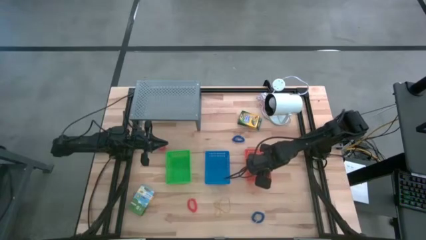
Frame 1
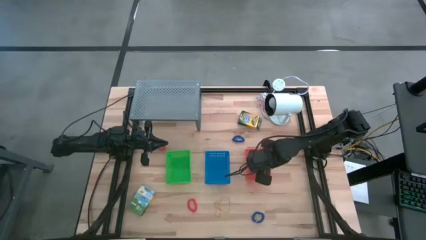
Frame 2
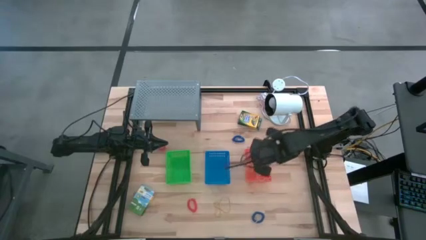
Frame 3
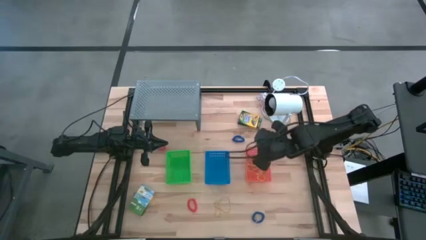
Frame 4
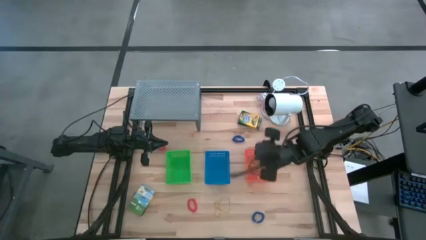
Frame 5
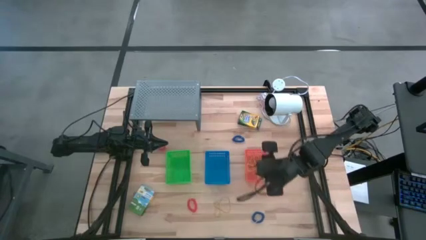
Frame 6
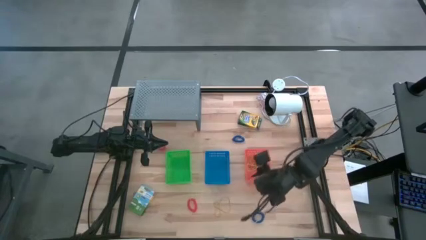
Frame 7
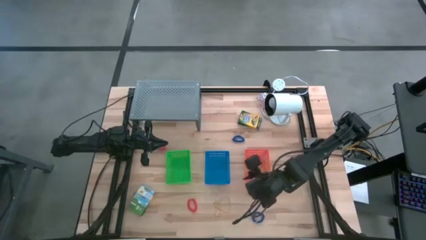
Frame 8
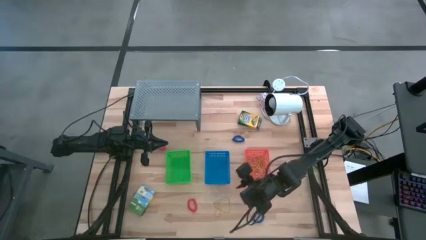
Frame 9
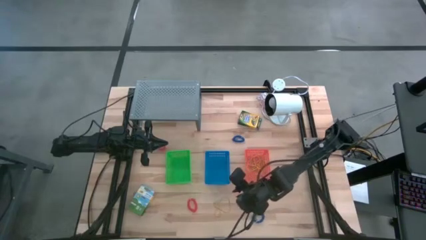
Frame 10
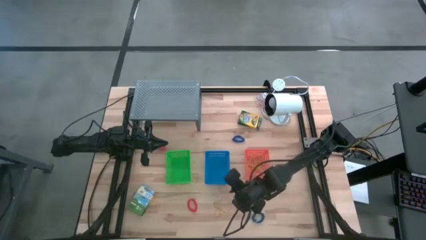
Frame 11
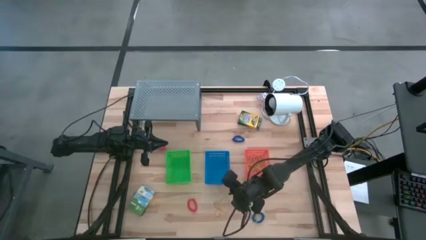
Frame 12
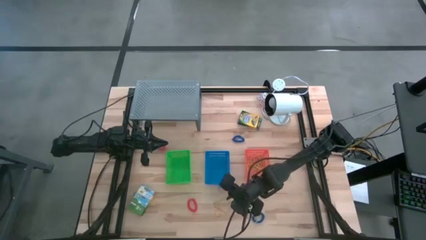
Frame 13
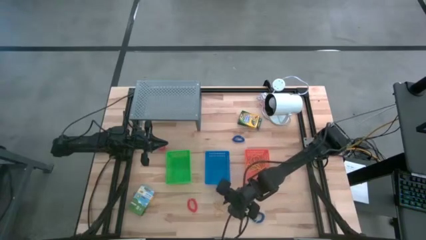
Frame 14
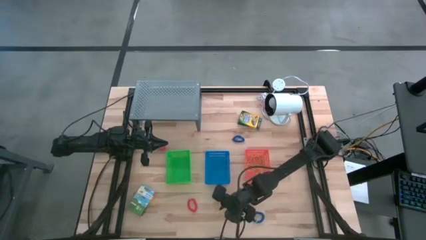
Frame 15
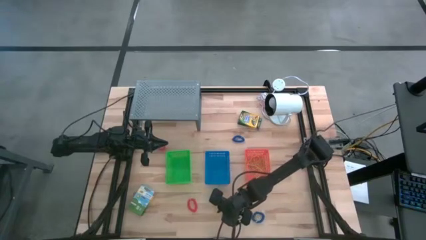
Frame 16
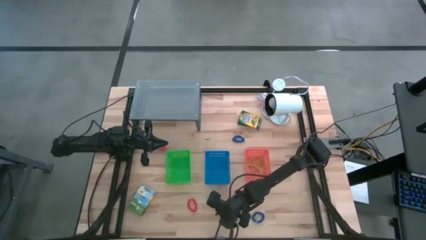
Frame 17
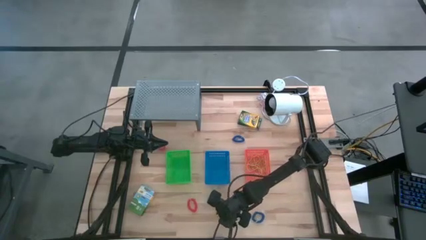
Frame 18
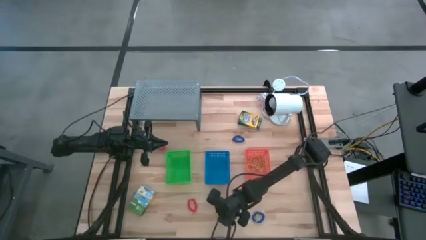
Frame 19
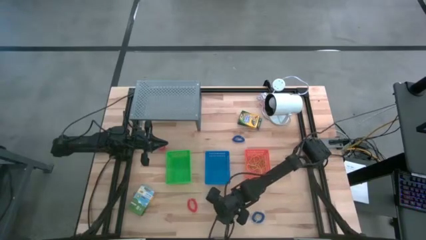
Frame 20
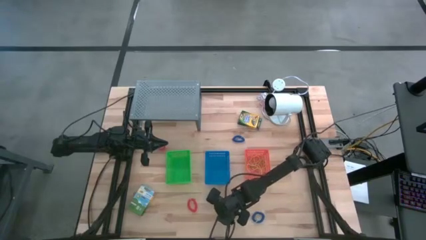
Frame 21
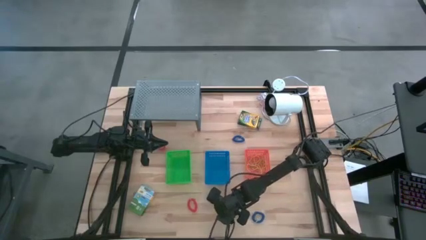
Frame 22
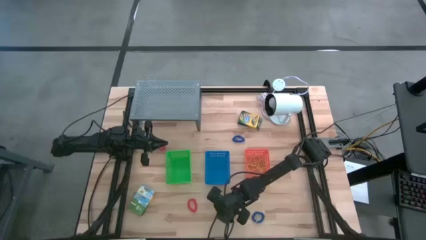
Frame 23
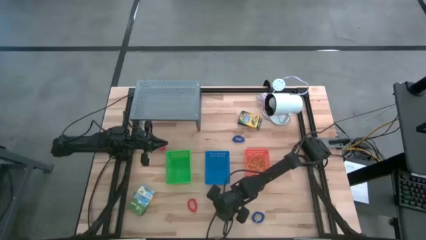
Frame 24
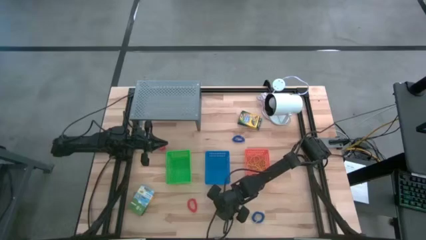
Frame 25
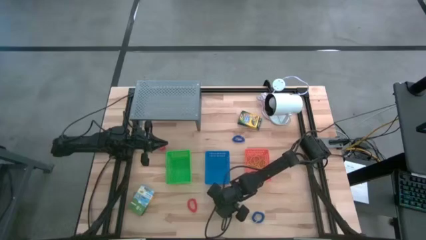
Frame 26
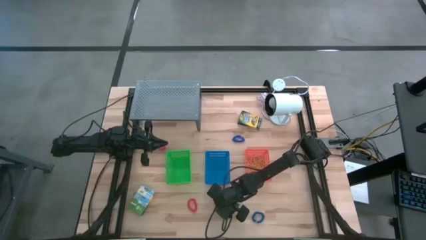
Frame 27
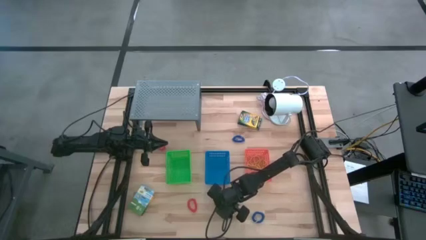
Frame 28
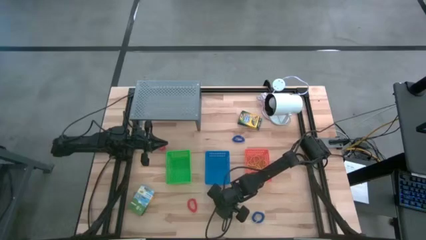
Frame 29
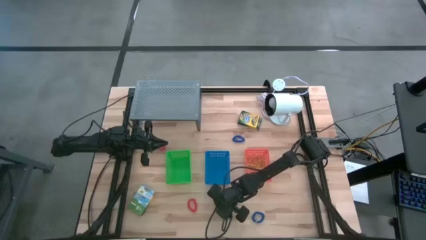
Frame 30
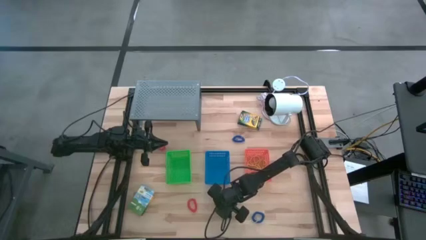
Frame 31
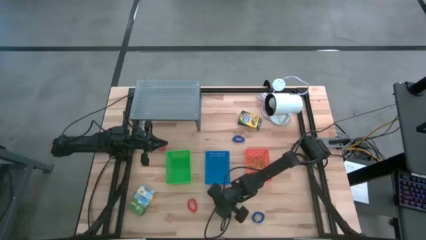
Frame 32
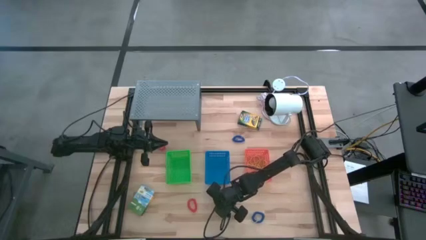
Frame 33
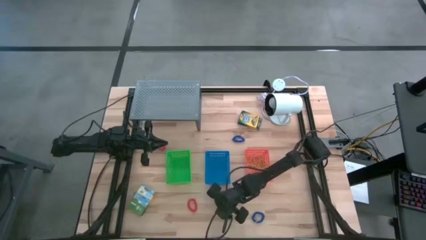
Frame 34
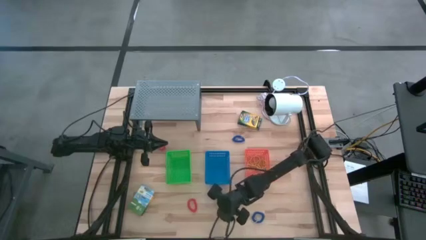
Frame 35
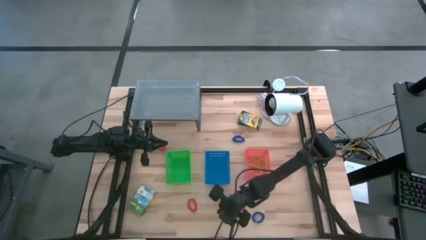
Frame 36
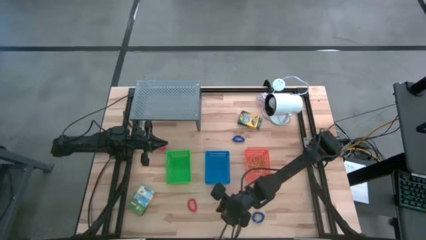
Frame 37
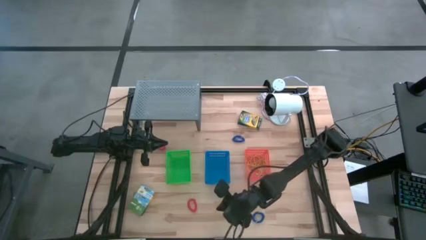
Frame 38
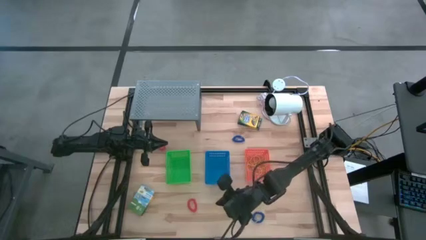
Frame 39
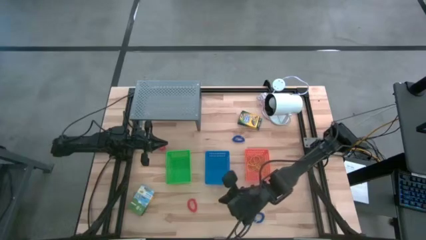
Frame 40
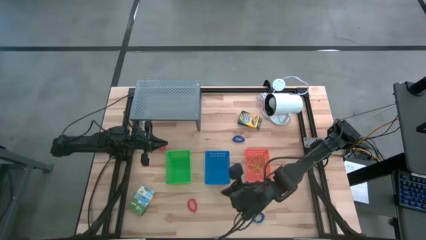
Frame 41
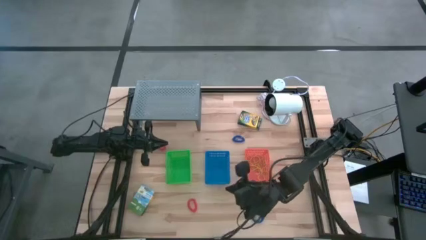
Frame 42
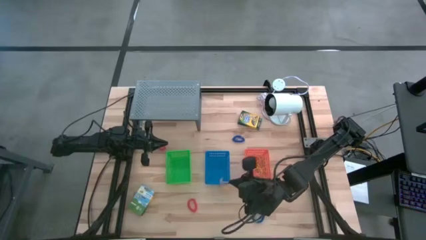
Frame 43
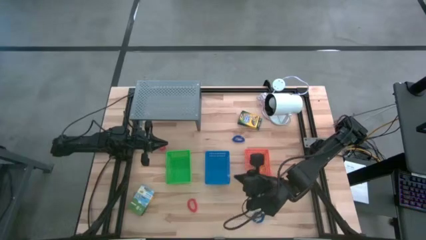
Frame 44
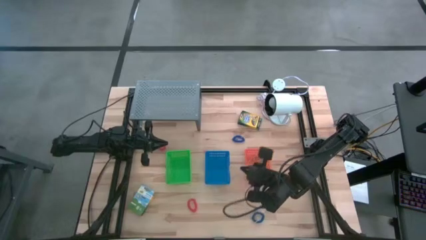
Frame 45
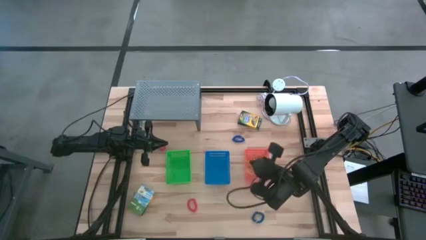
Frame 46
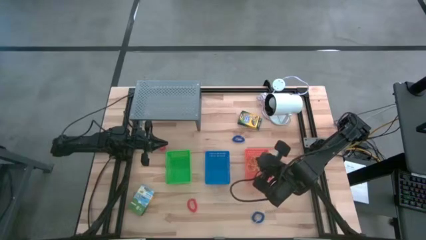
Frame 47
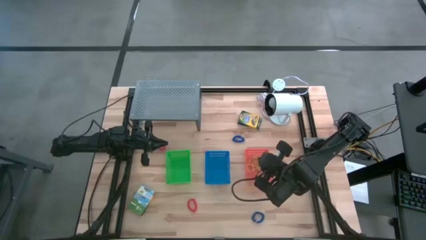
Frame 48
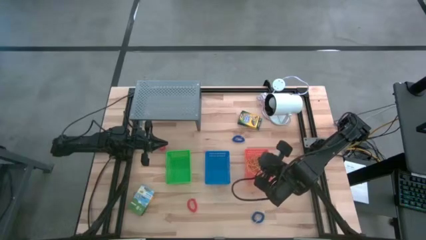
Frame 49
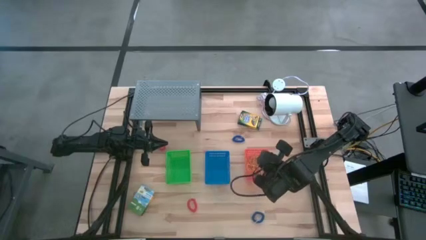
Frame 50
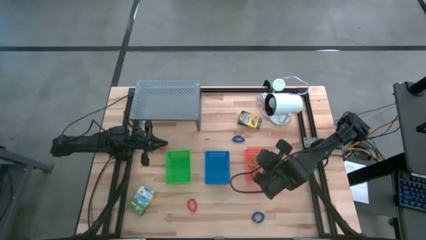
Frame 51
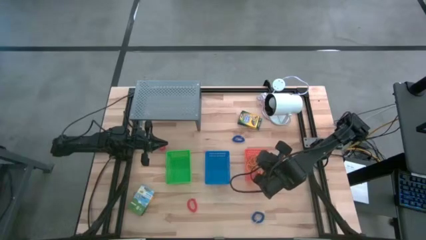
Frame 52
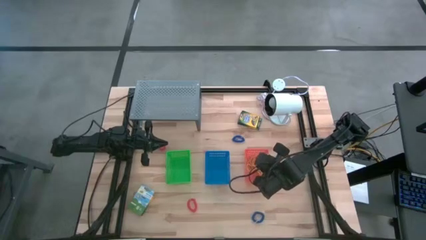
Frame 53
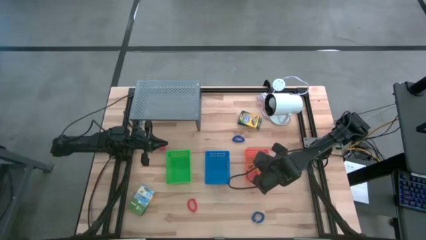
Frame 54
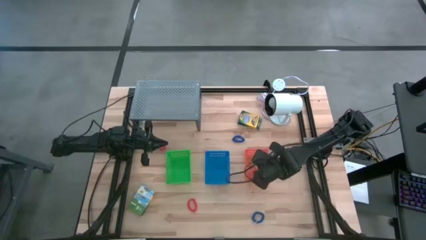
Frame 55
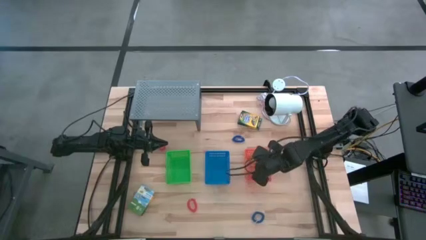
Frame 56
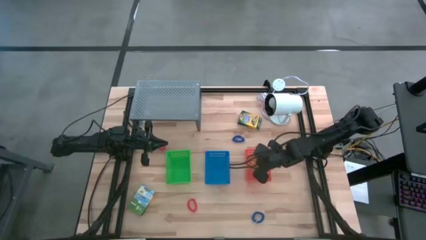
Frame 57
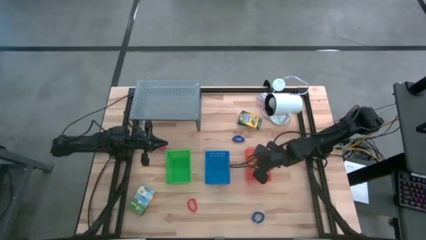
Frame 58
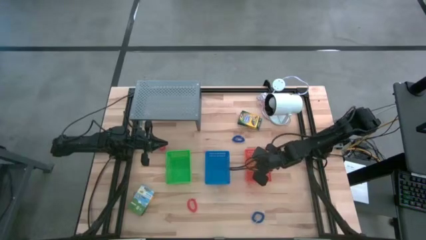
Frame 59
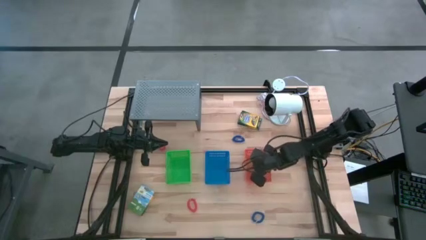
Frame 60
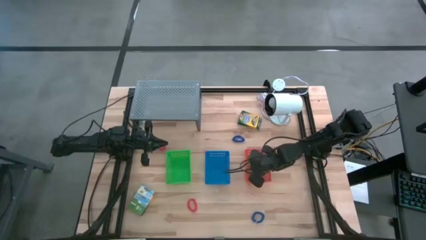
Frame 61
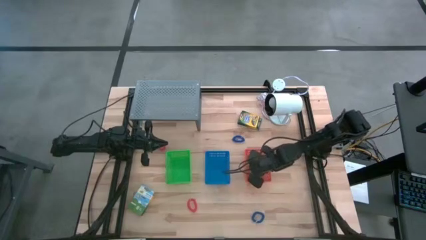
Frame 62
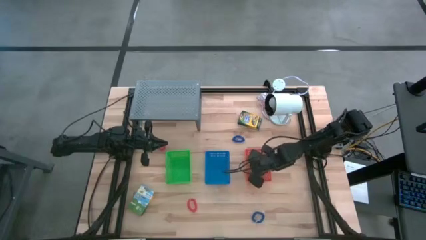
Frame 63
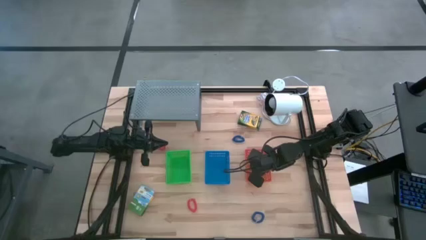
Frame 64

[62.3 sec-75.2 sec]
Task: Pick & Place Office Desk Supplies
Put the yellow rubber band into the orange bin

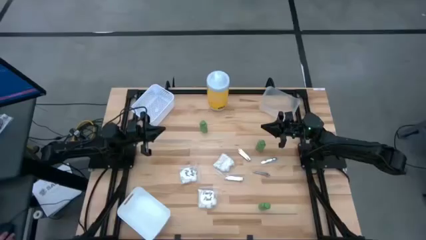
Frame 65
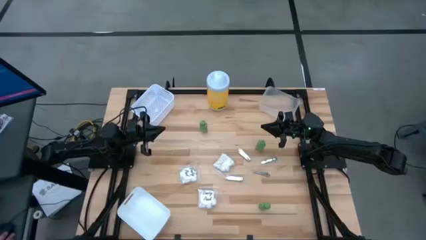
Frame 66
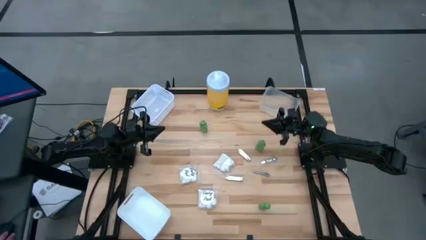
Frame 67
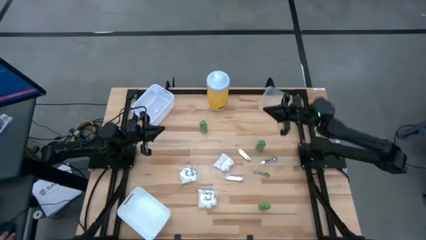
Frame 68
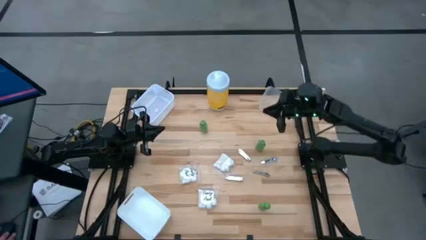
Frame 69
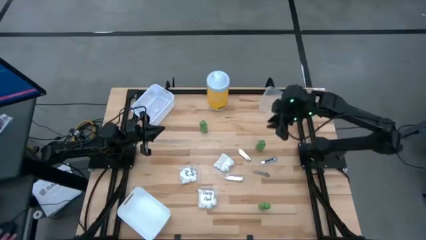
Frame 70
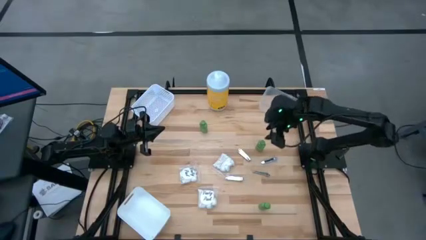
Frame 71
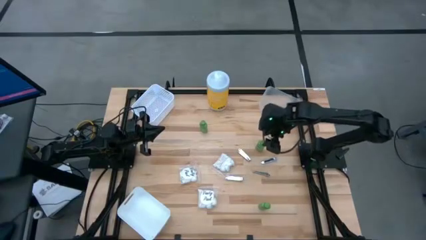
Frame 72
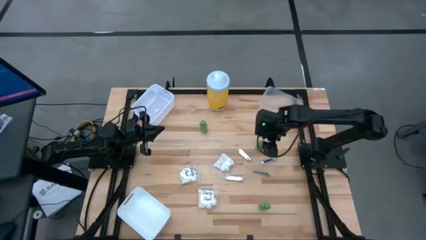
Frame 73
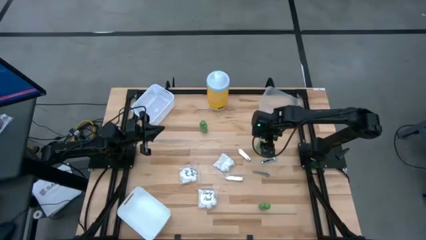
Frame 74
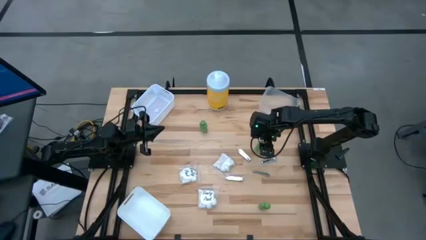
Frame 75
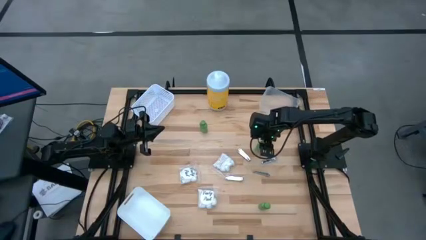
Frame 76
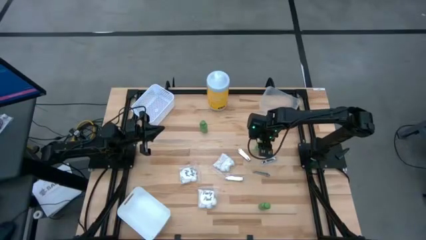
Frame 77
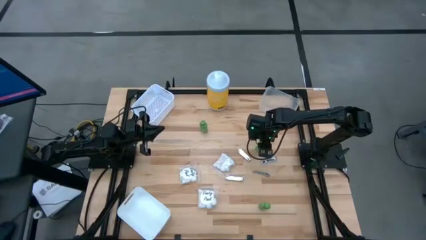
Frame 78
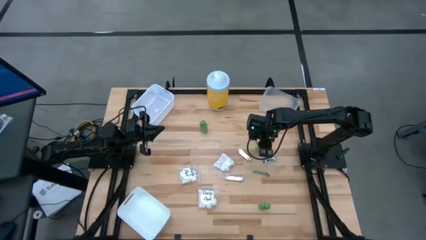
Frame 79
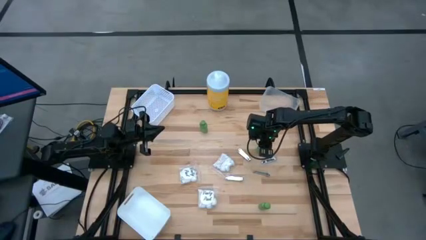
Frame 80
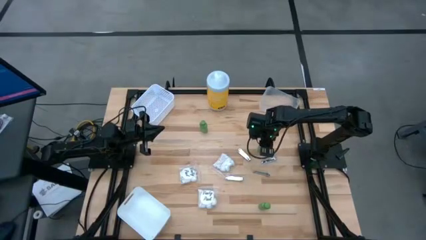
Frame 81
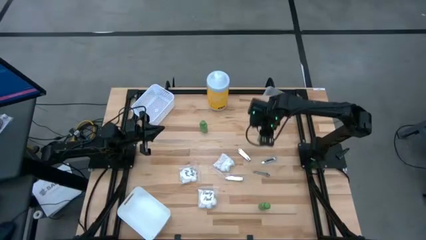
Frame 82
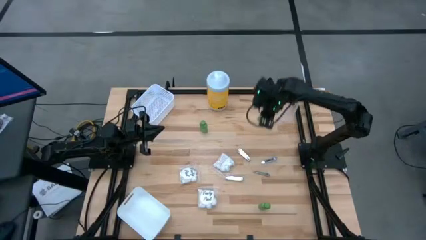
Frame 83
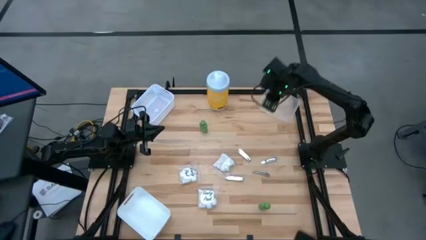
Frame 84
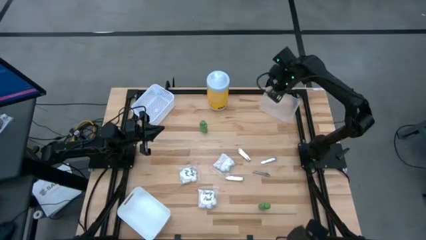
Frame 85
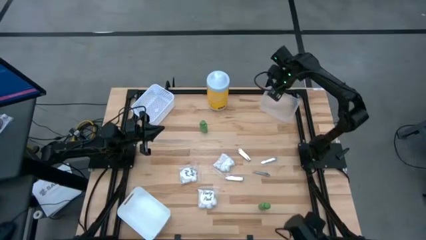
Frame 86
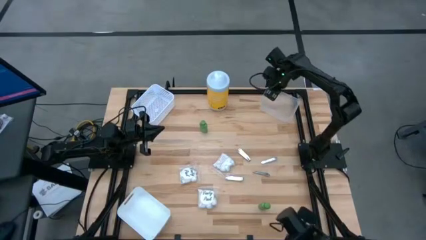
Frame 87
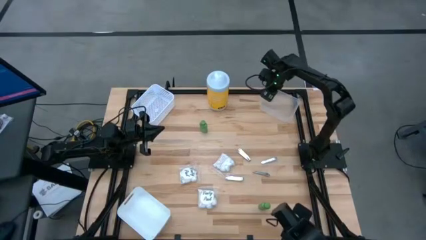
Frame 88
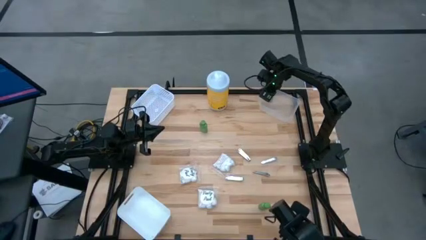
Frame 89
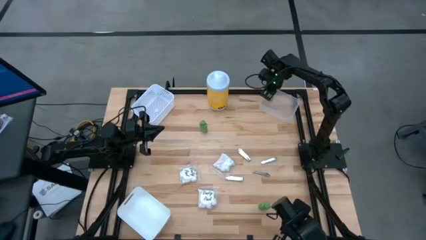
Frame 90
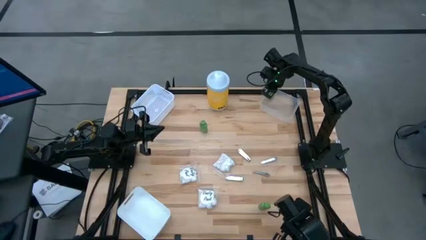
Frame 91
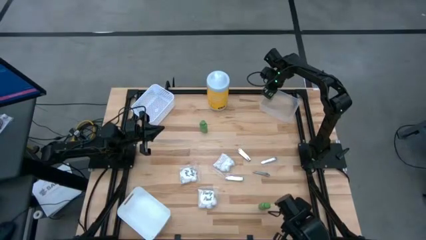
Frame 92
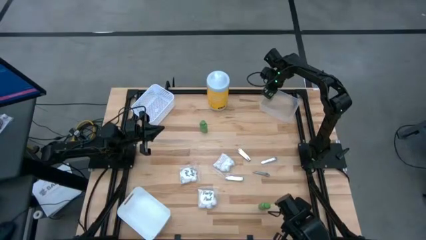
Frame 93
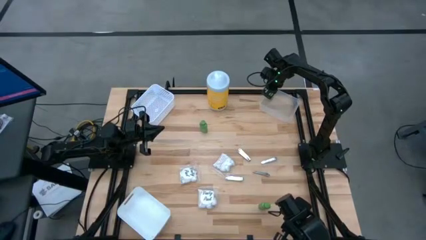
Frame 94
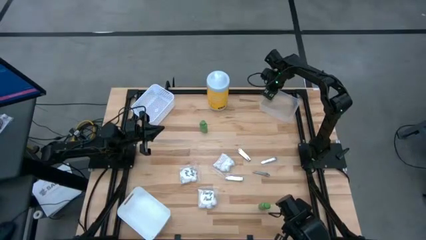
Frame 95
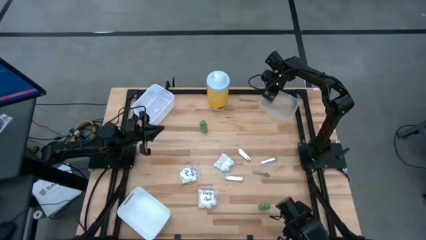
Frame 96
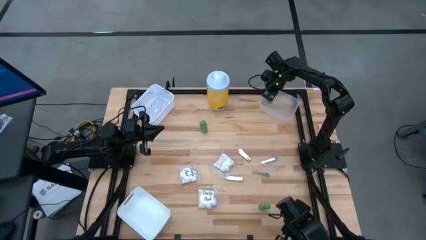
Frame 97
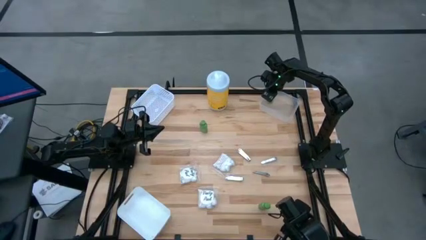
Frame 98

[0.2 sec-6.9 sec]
Task: Pick & Place Travel size toiletries
Put the green shampoo into the transparent bin
